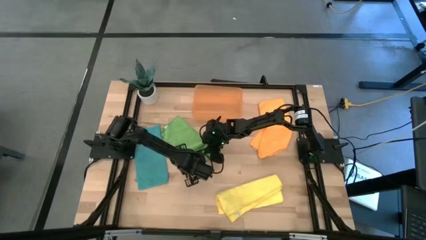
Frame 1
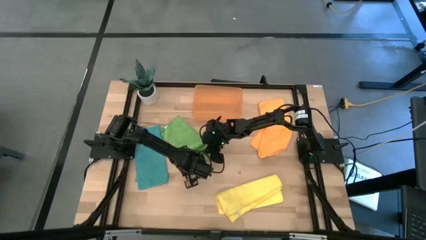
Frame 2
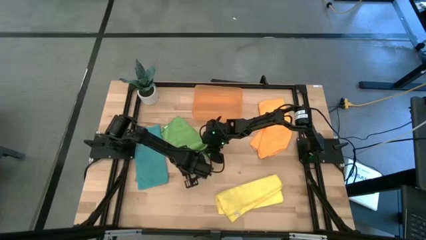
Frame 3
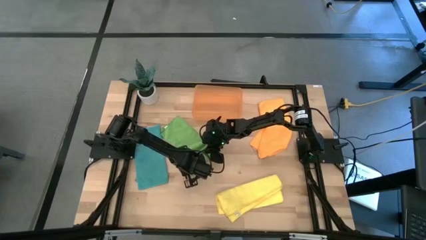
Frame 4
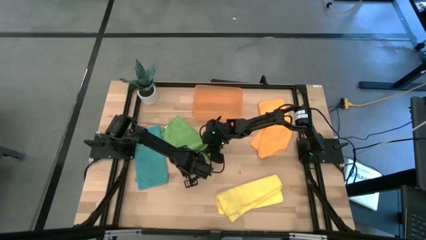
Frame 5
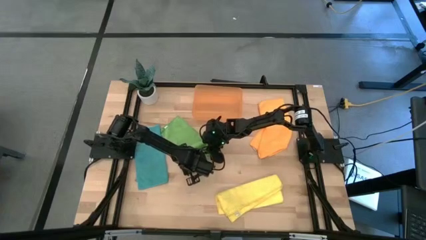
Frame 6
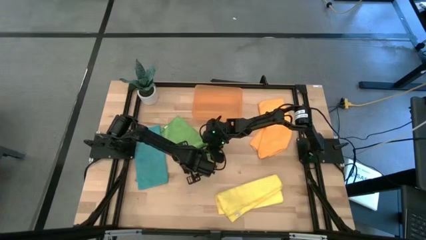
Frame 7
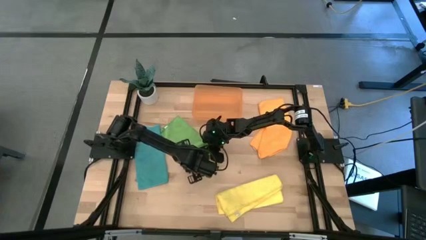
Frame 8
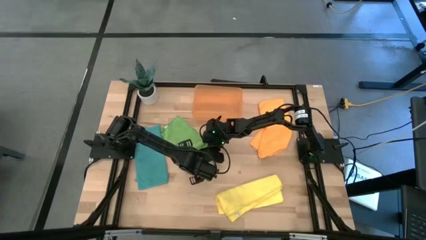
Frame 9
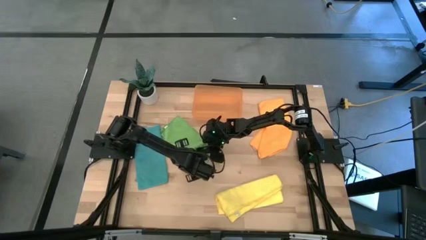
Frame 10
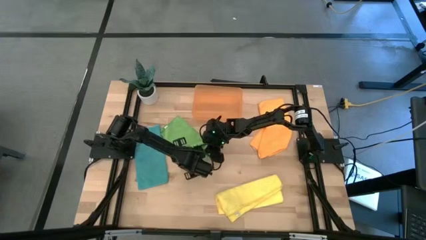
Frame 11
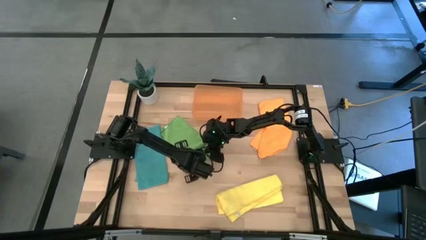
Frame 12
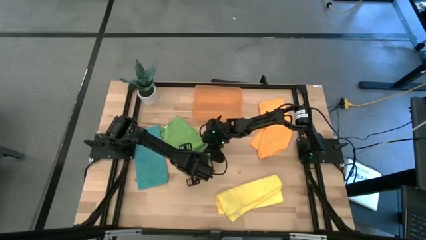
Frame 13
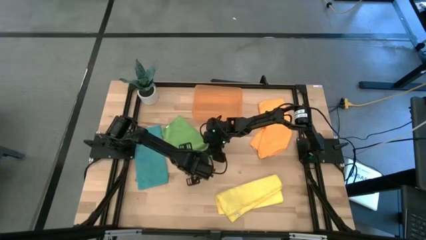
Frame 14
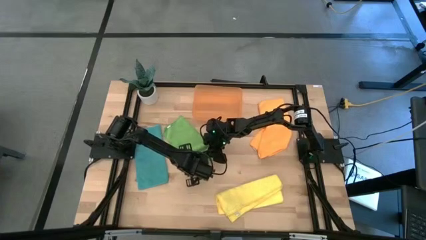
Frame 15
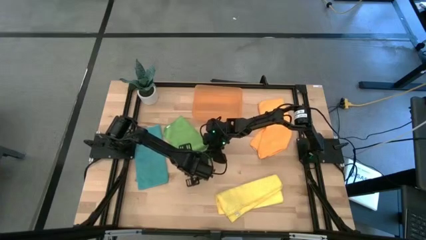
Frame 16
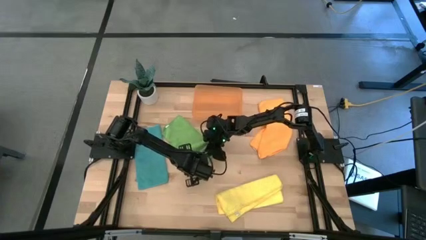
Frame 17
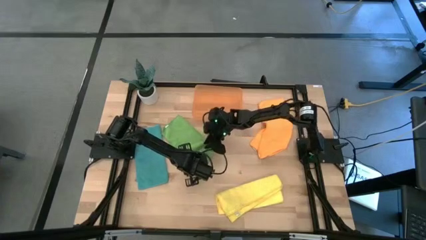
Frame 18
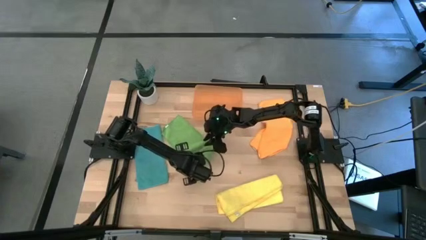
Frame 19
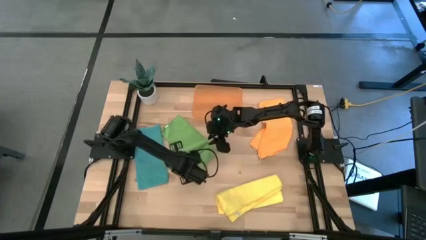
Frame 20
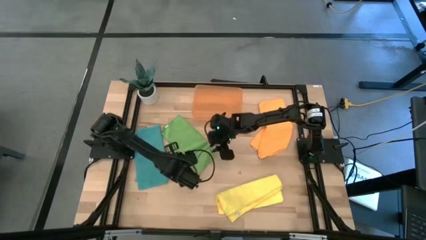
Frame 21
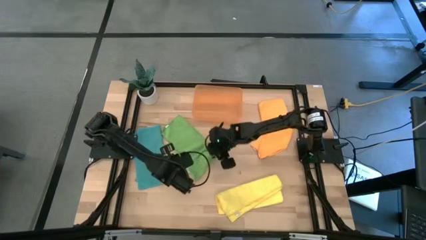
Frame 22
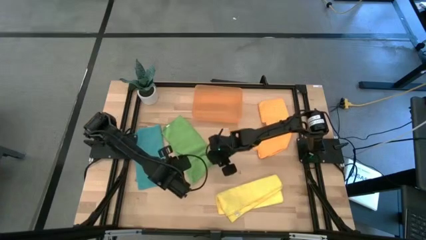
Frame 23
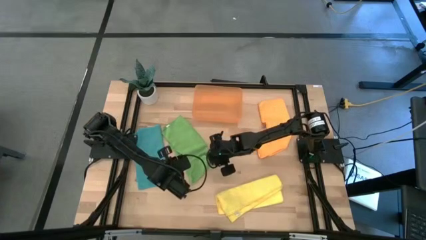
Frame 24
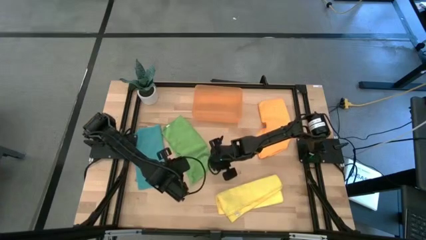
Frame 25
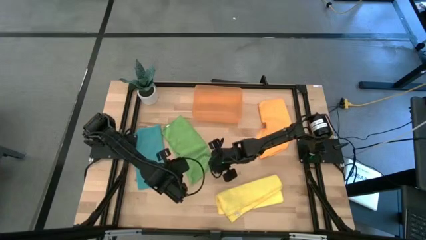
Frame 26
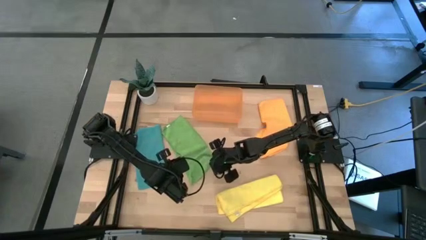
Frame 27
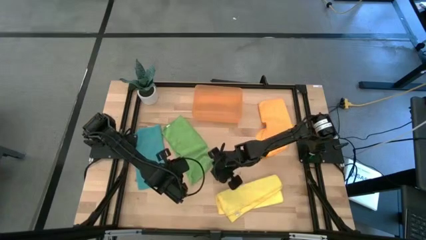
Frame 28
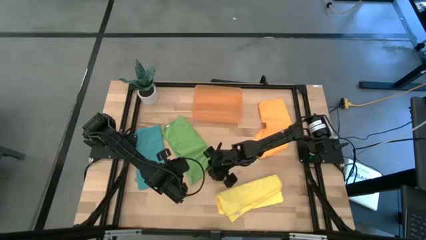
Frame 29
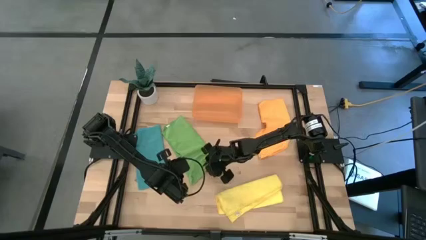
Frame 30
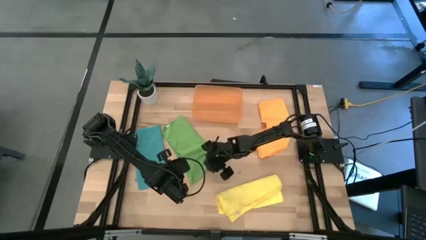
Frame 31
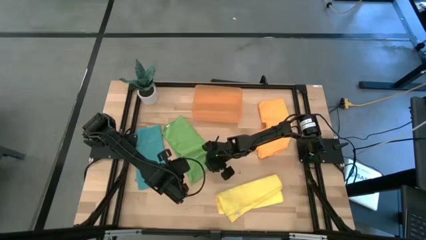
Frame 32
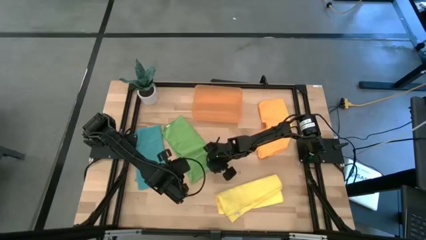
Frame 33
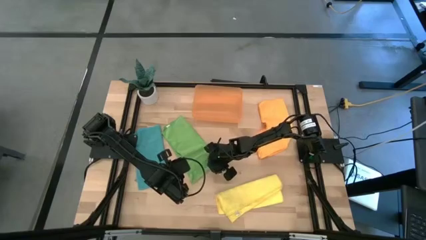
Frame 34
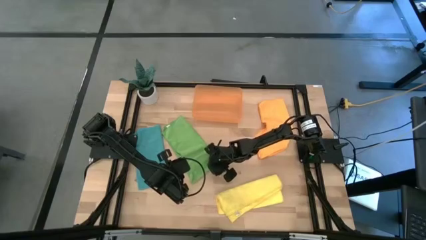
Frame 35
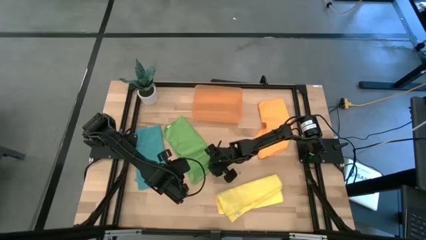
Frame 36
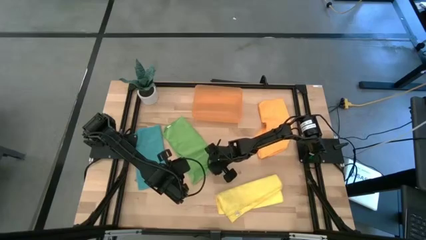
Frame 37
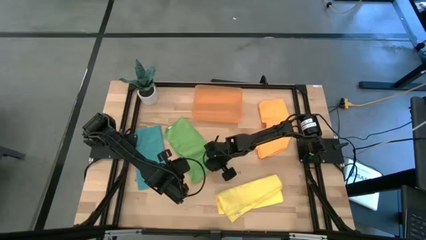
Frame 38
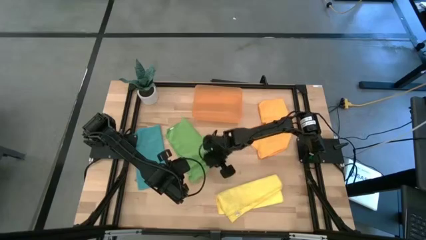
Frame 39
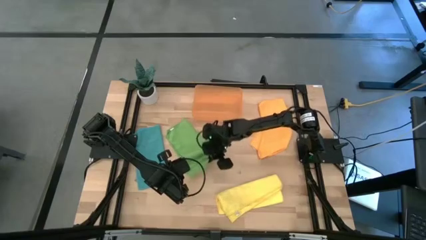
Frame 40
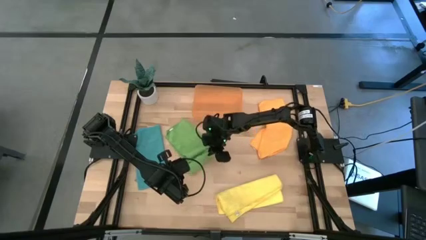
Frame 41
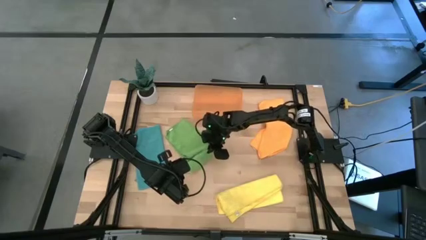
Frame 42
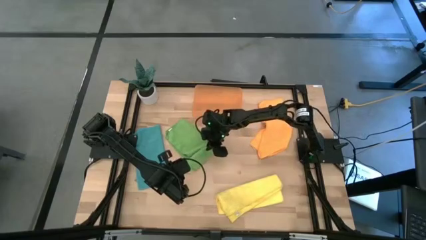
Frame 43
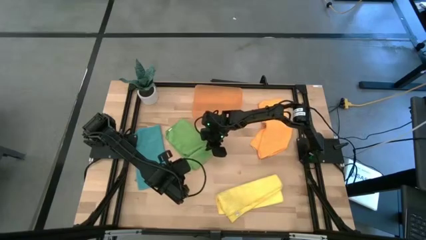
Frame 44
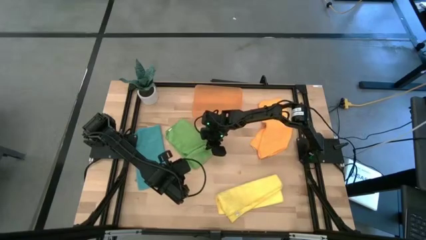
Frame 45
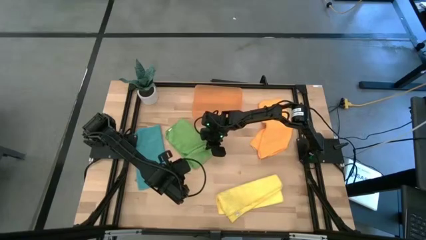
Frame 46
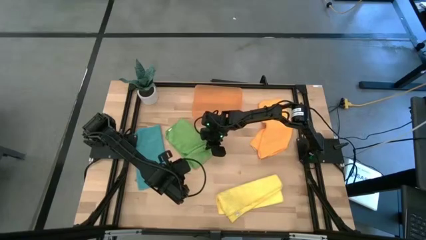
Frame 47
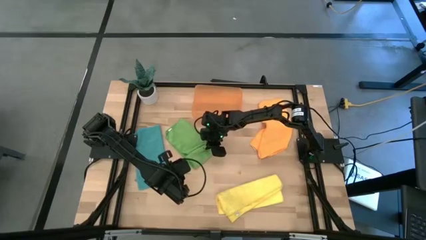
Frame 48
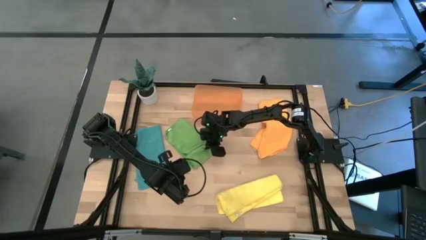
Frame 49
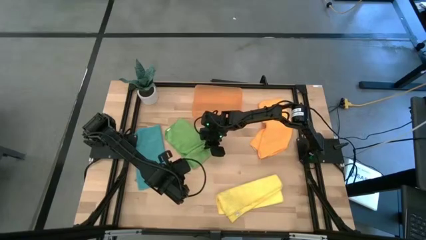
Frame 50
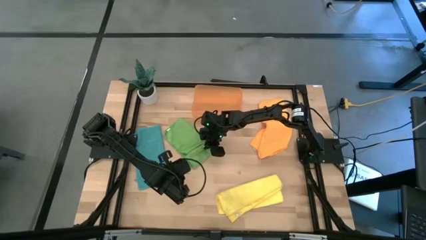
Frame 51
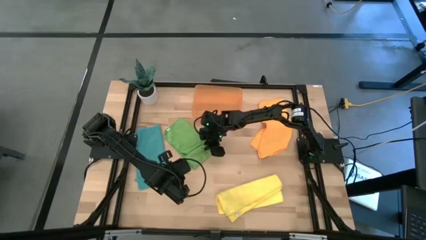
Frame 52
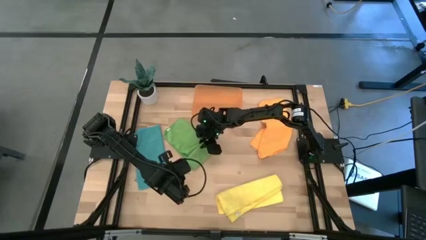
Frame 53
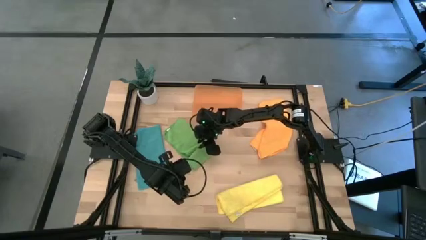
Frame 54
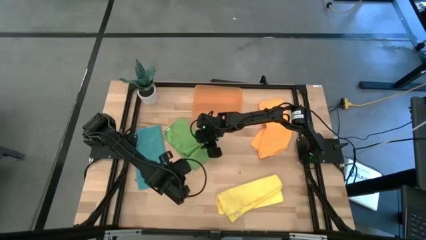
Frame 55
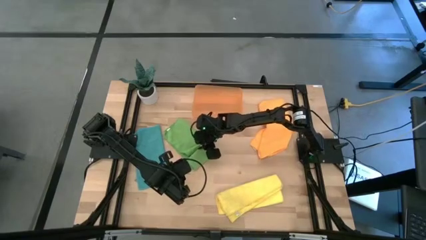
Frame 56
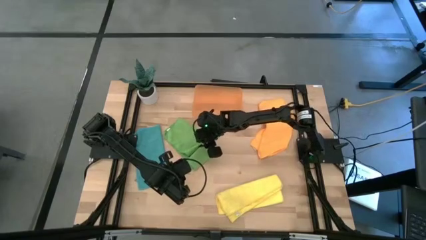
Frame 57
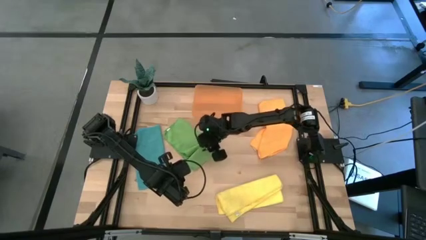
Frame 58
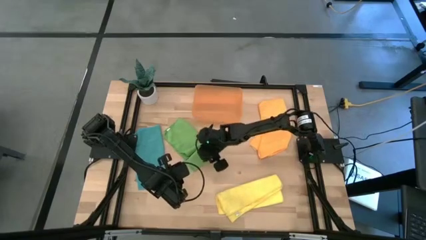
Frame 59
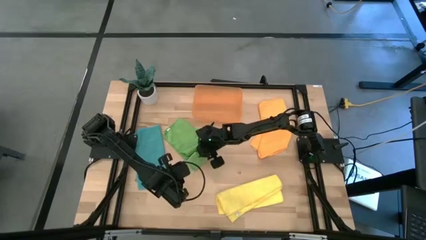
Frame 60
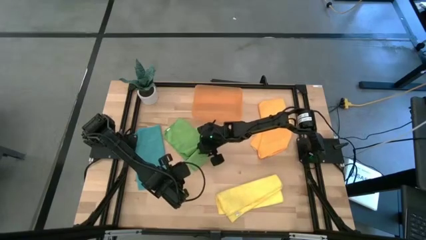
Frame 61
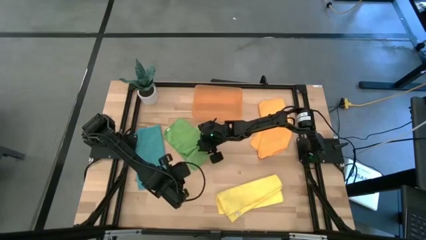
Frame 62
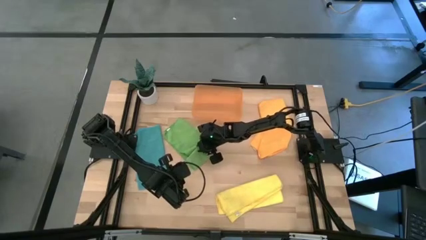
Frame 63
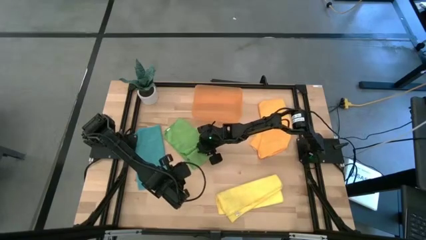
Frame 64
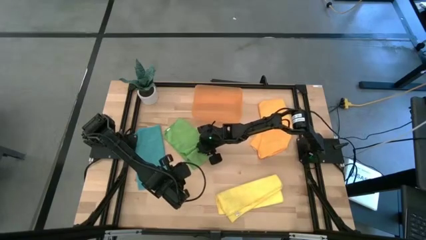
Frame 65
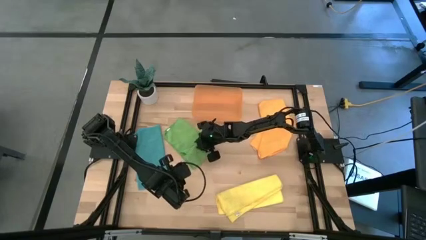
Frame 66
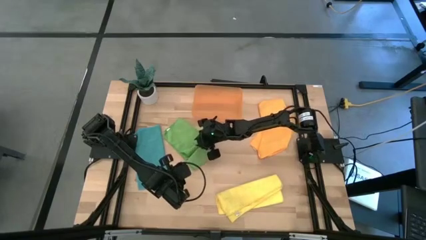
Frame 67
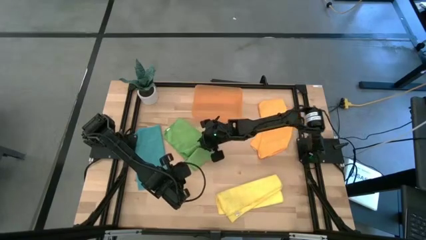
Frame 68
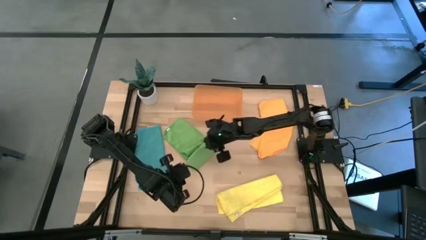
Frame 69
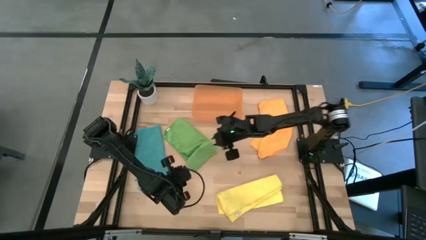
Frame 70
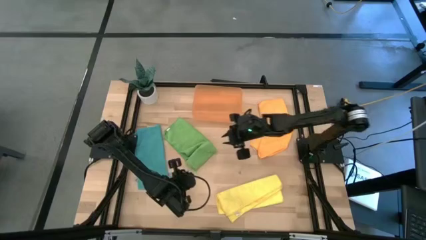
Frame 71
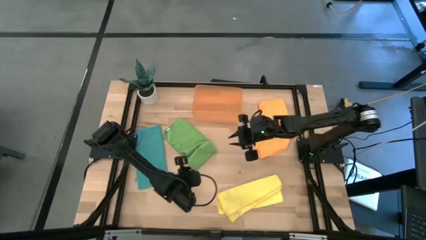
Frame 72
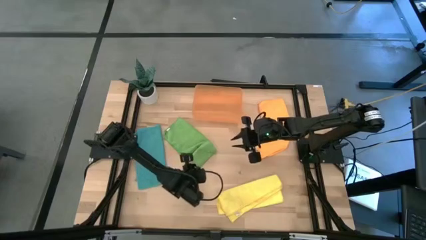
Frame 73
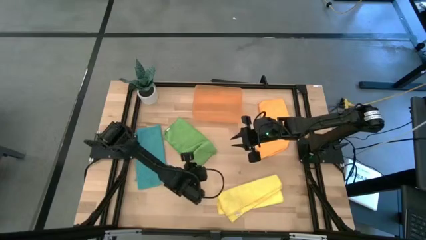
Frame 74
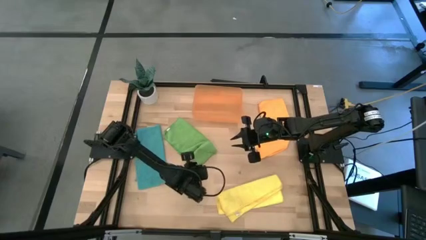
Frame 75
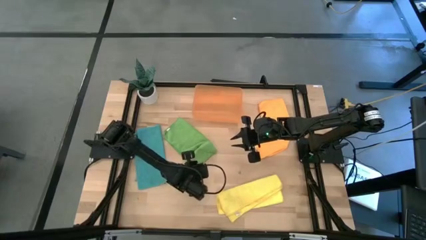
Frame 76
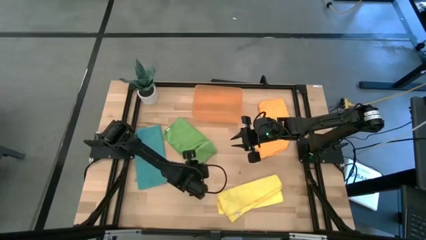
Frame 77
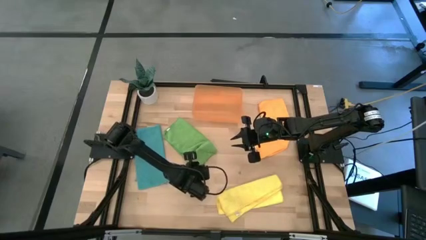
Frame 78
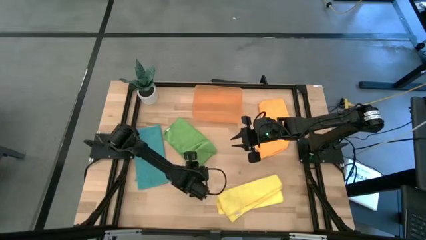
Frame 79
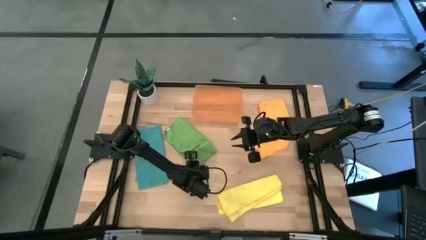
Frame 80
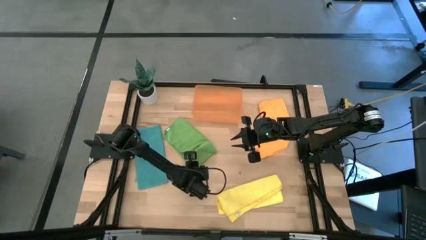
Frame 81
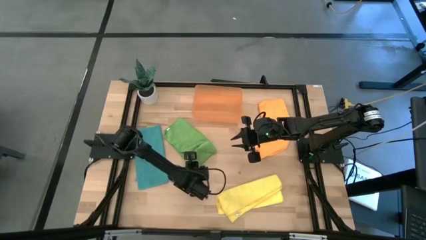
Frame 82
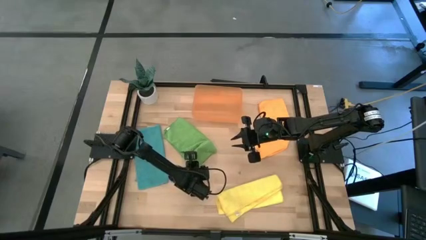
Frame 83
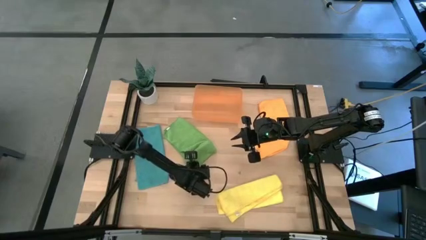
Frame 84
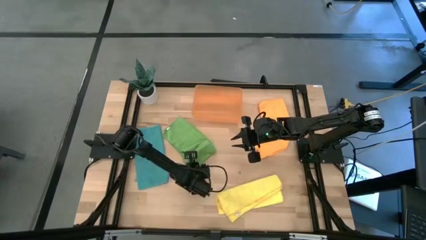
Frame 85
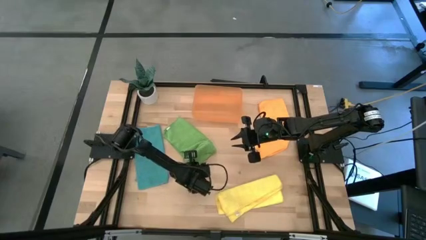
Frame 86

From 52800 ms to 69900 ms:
Task: Roll microfiber towels into tight, uniform cylinder then place into a basket
Roll the green microfiber cloth
